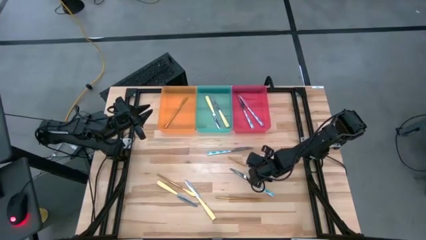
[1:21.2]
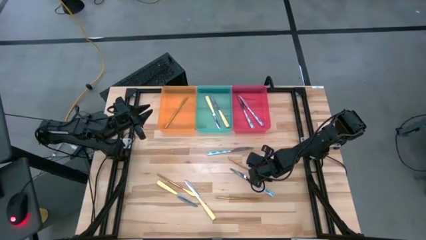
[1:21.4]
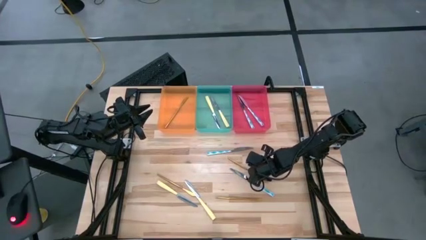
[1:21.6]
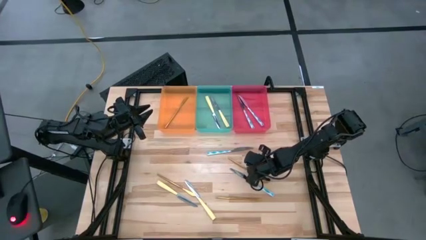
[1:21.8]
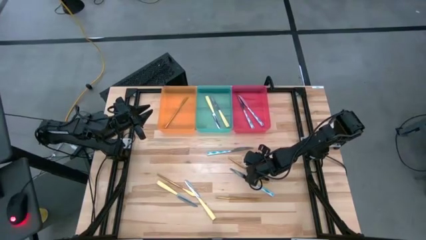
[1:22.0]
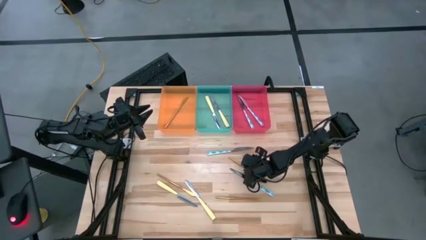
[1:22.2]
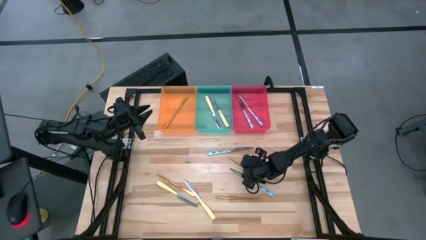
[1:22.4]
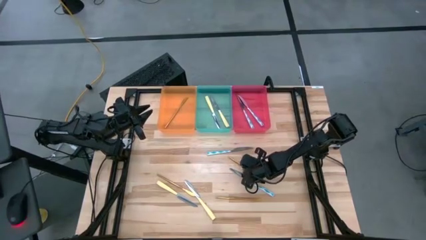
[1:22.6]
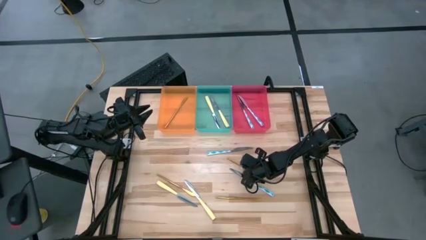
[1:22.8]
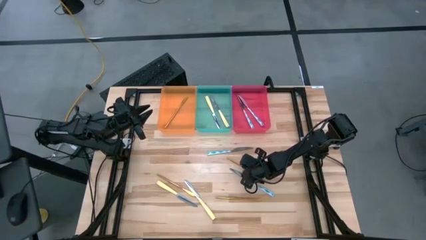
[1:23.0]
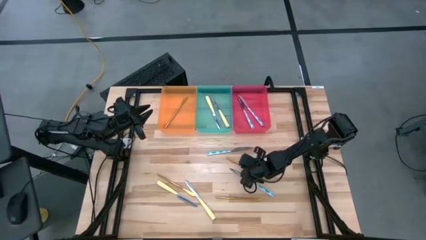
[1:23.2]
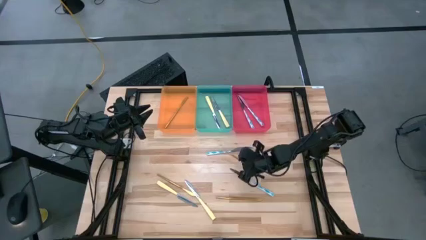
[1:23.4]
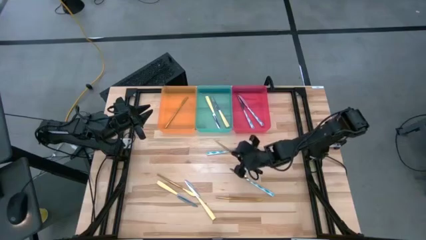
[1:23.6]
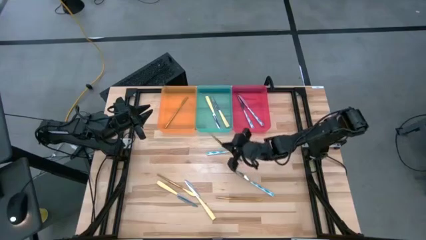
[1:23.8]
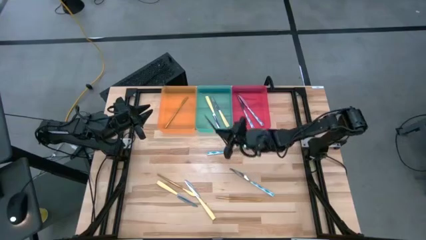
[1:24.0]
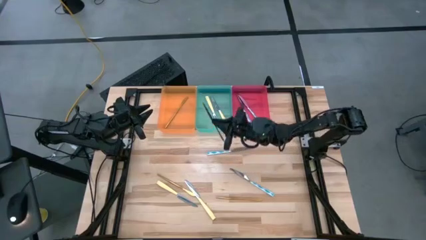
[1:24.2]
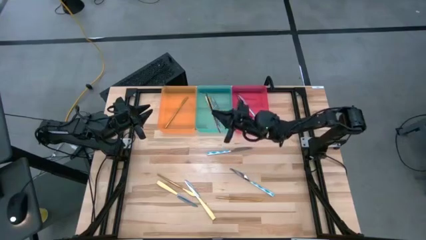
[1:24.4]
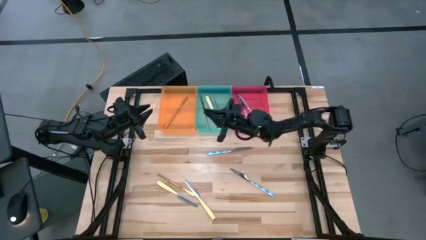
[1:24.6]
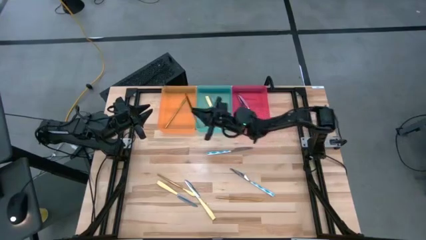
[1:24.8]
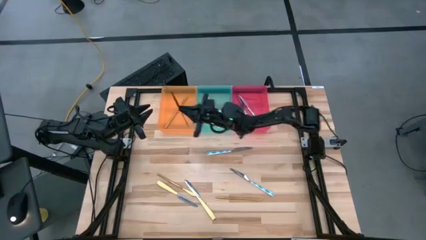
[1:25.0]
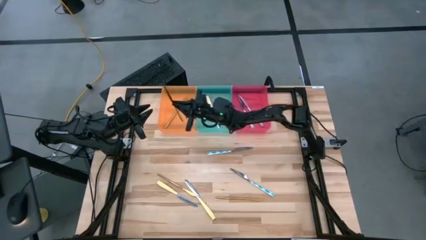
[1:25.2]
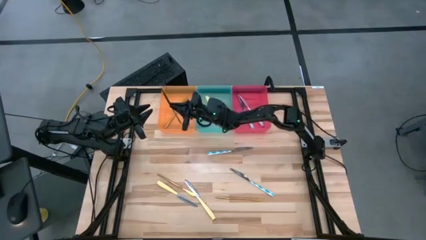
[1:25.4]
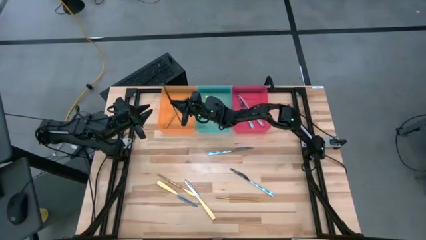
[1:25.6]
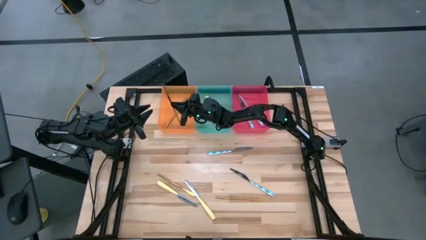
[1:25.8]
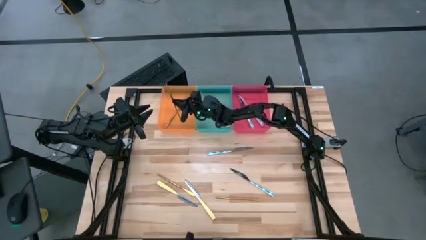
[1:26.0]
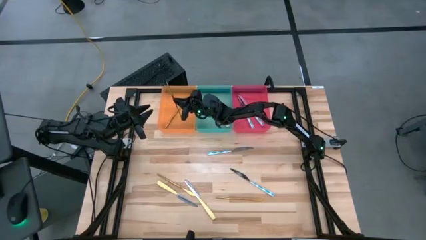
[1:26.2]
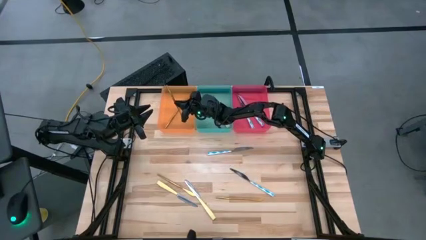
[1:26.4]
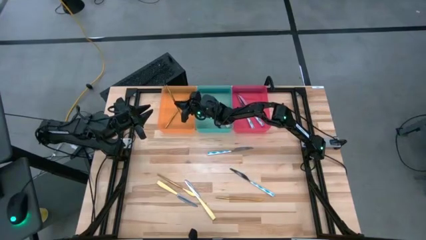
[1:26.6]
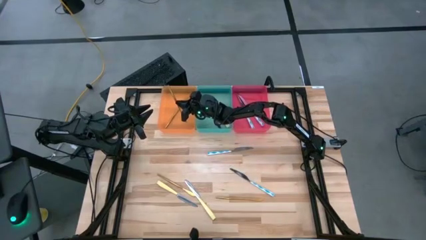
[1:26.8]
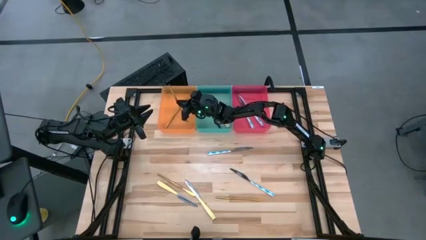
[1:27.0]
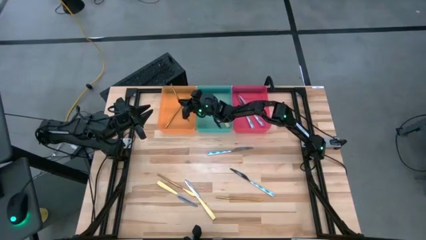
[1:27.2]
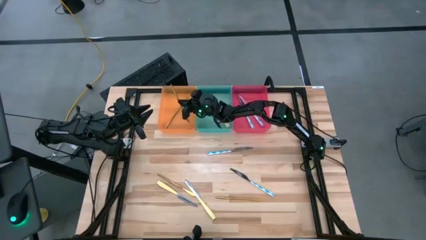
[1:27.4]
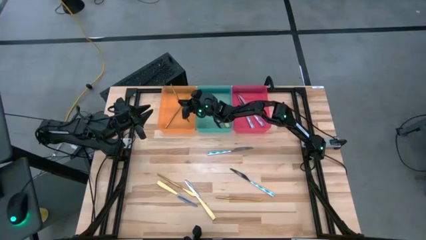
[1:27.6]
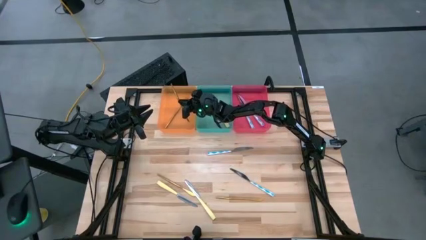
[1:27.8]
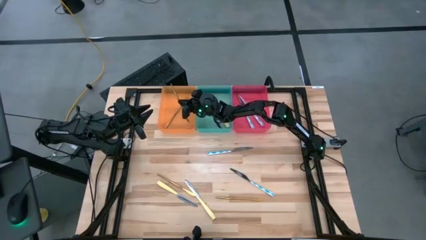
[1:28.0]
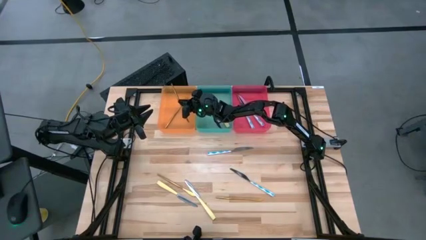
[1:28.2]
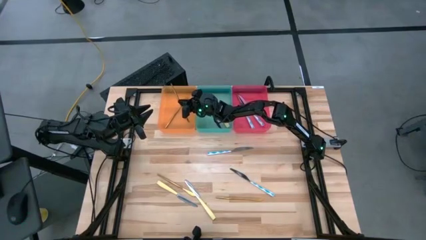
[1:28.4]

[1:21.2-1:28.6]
Task: Sort silverware by color (type)
Put the gold table knife into the orange bin

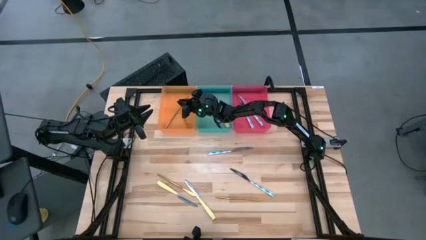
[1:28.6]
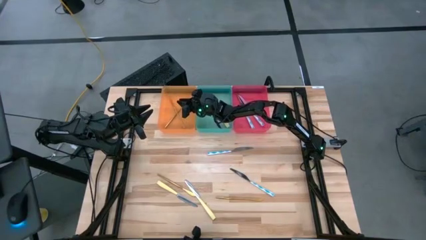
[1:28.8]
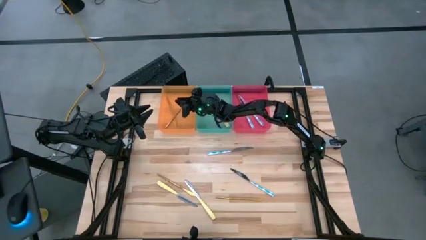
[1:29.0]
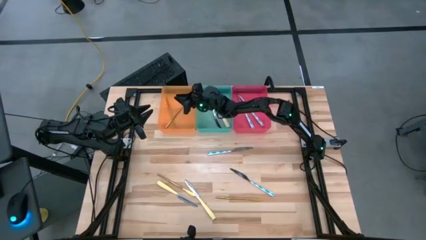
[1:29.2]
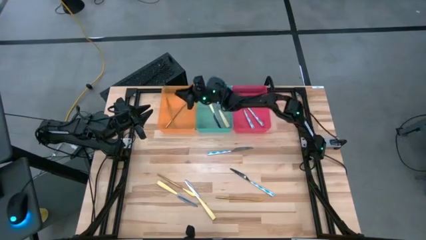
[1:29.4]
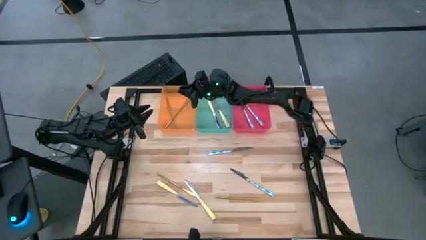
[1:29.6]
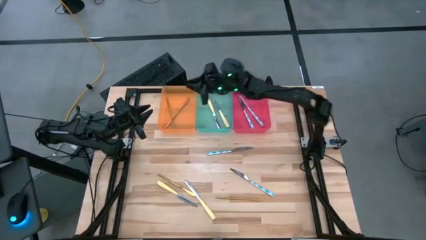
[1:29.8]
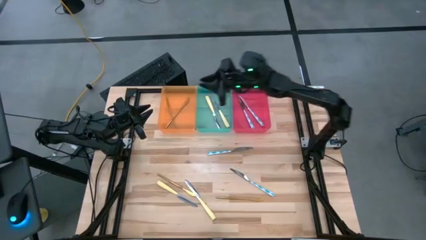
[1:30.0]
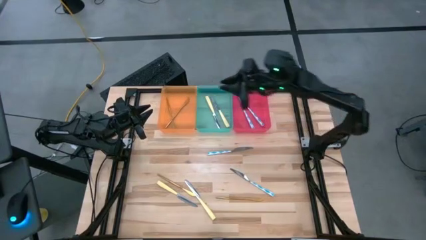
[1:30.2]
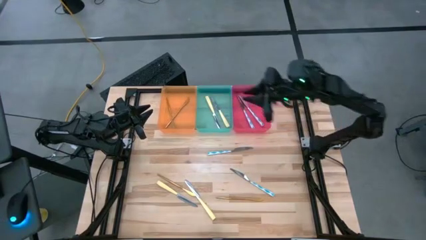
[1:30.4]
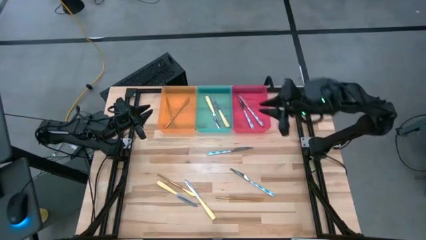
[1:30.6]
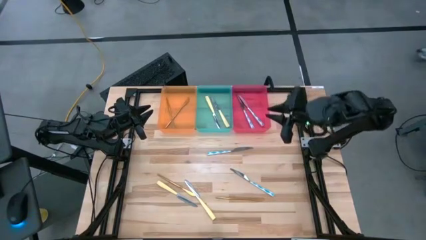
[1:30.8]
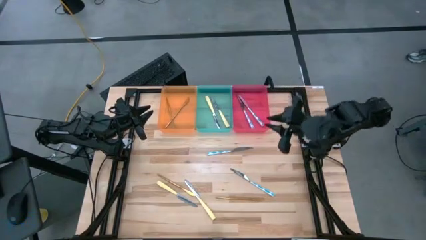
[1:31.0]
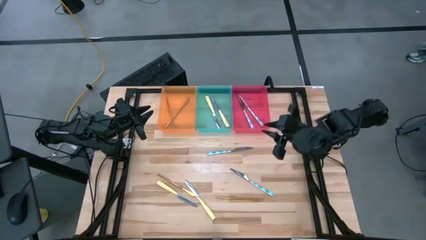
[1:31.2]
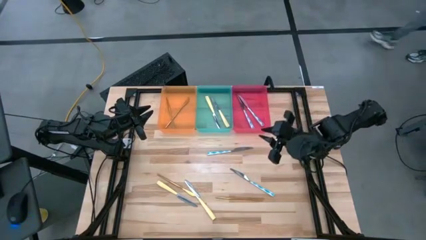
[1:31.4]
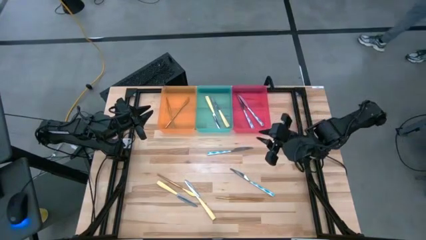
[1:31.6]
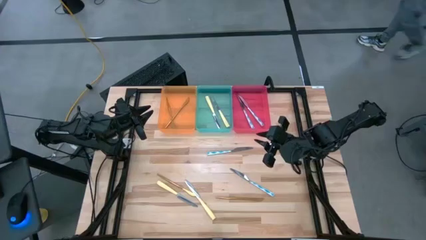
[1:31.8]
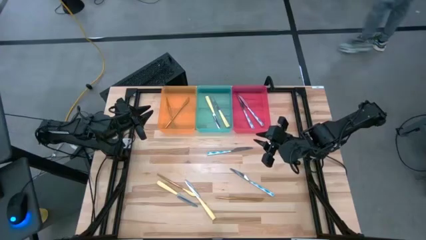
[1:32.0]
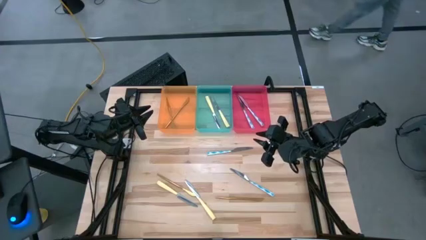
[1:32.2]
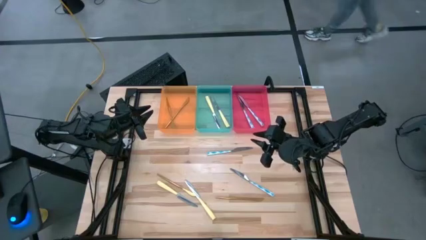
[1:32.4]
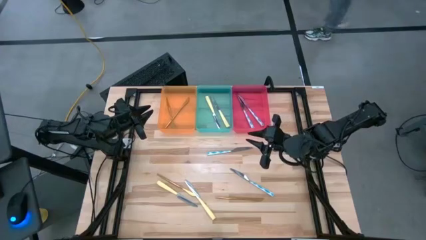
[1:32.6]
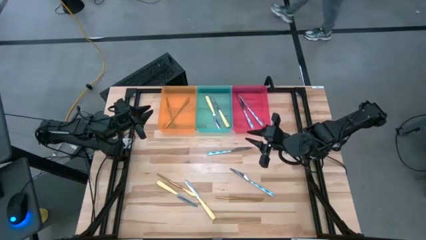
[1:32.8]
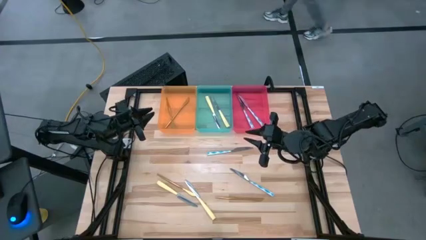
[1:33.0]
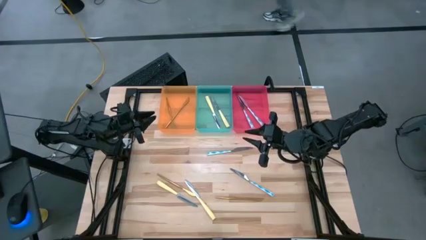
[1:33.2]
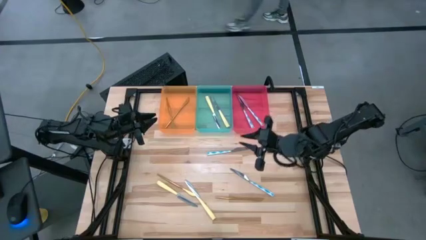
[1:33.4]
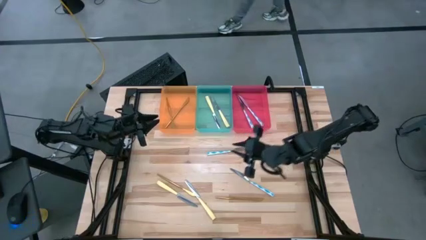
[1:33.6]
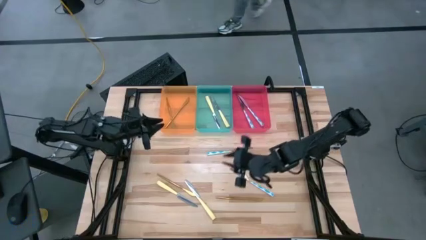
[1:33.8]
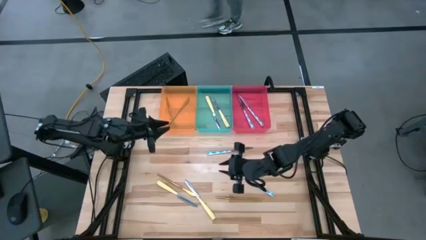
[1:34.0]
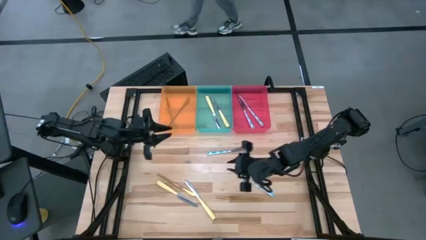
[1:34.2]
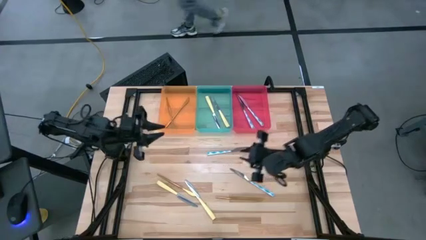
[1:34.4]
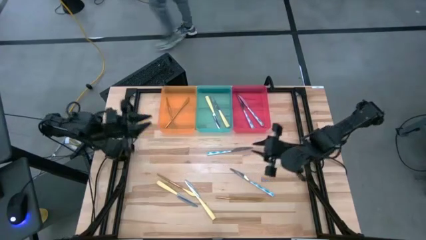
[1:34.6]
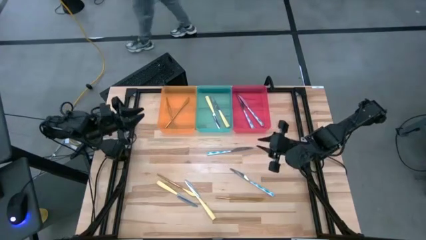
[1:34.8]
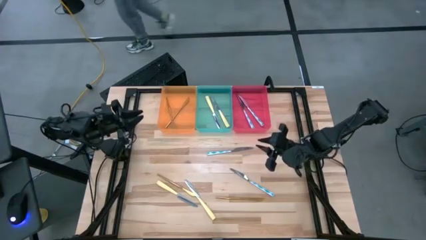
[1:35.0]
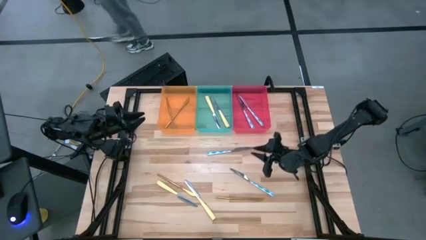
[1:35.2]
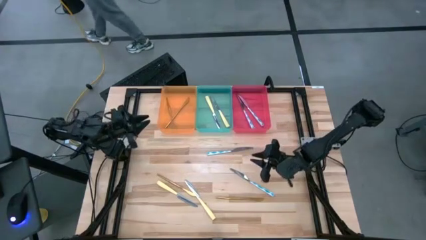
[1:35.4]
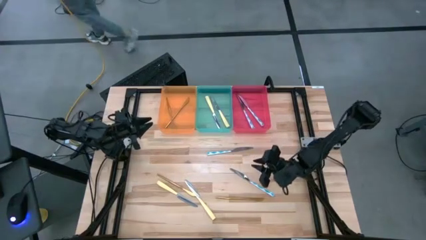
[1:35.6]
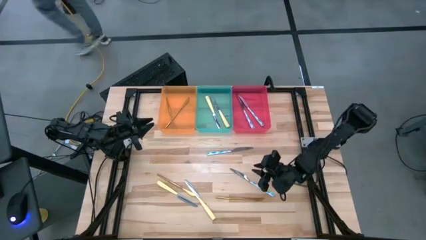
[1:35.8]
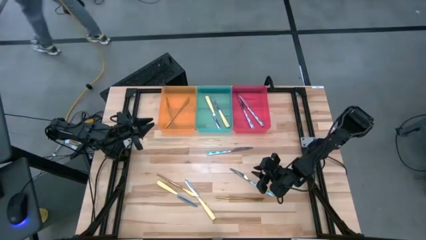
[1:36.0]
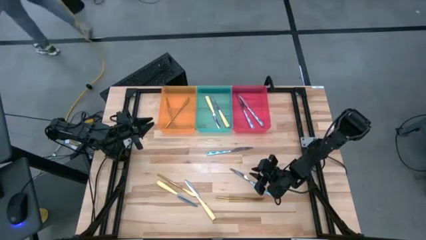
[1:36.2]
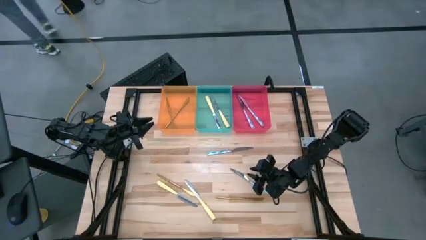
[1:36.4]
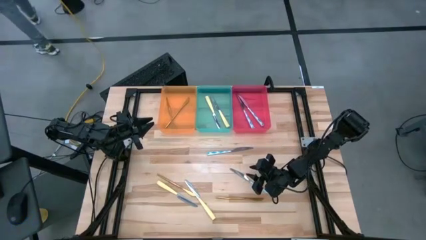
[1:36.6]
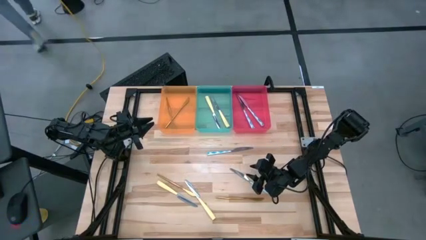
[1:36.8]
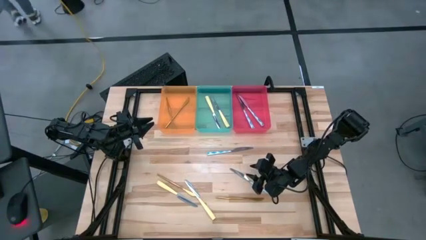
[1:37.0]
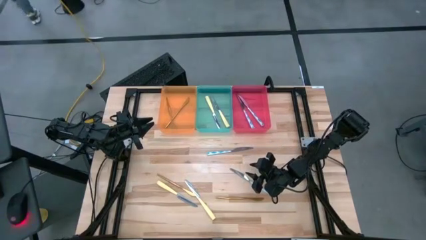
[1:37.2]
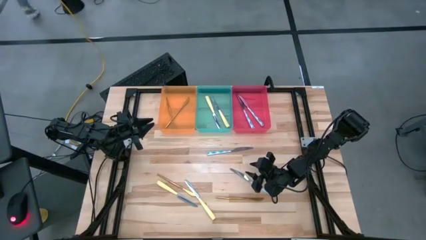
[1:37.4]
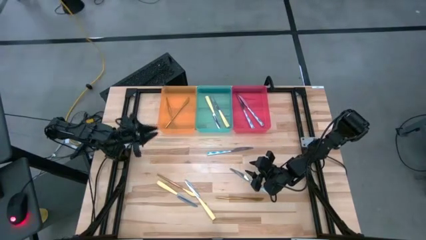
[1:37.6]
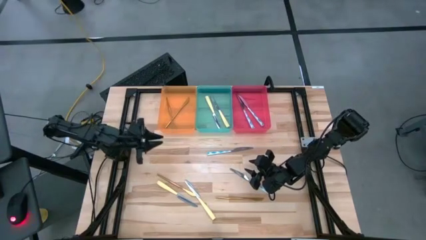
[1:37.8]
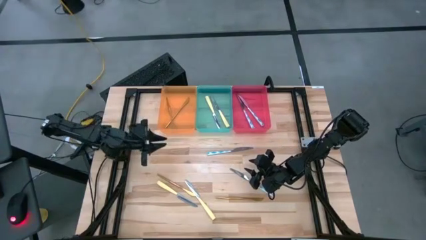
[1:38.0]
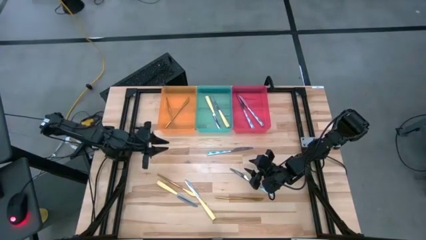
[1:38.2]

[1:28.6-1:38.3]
Put the blue patterned table knife into the red bin
